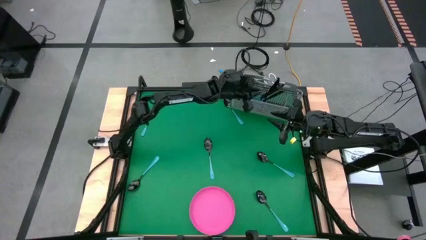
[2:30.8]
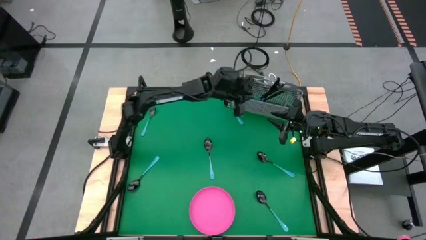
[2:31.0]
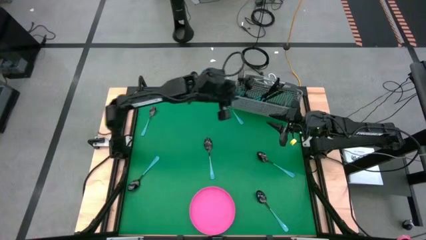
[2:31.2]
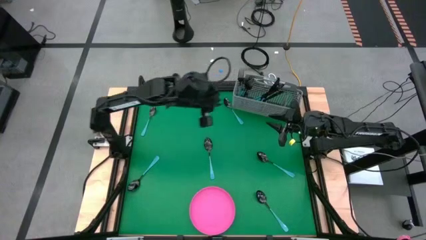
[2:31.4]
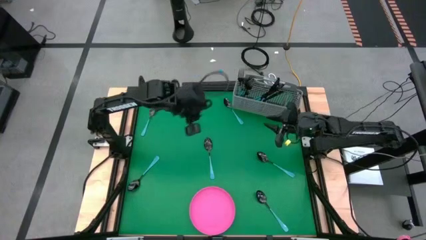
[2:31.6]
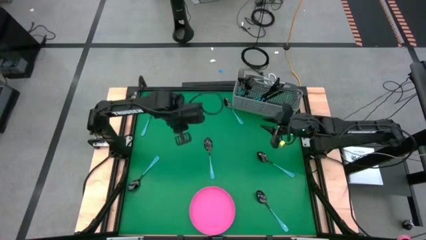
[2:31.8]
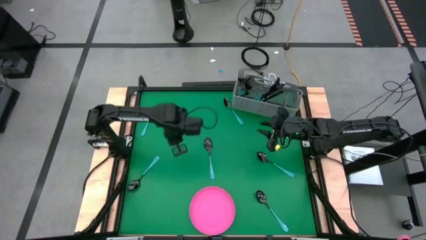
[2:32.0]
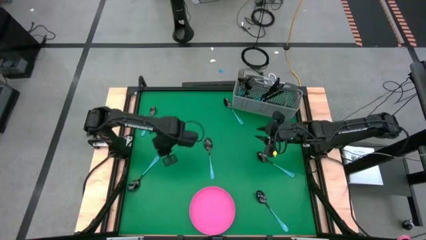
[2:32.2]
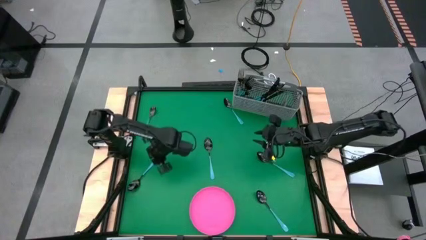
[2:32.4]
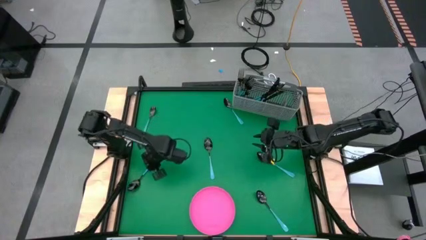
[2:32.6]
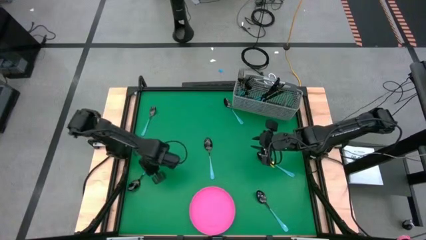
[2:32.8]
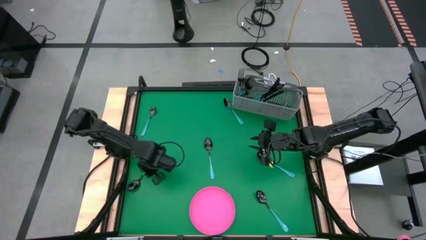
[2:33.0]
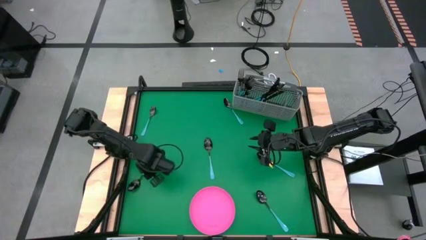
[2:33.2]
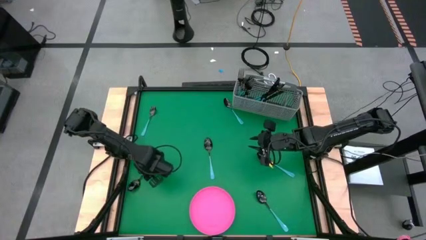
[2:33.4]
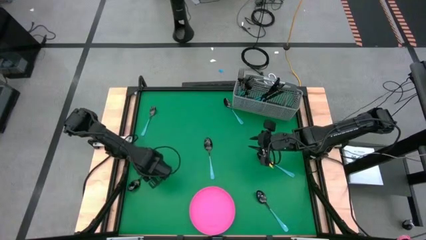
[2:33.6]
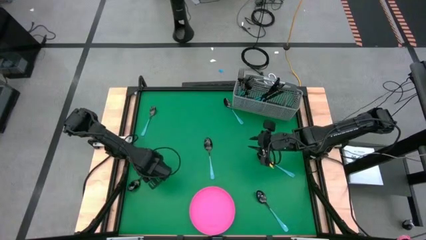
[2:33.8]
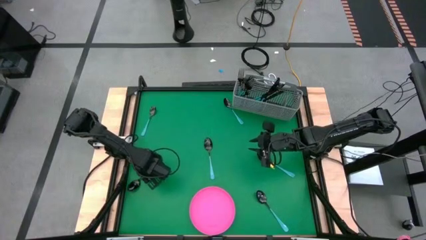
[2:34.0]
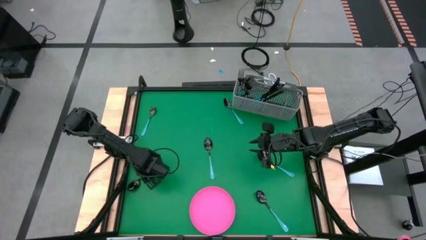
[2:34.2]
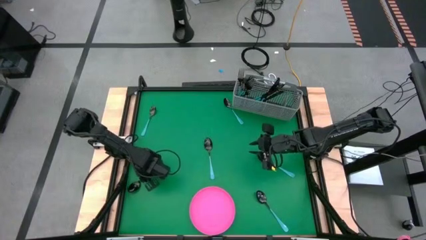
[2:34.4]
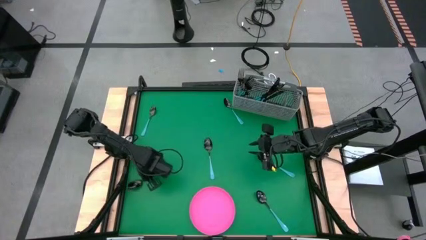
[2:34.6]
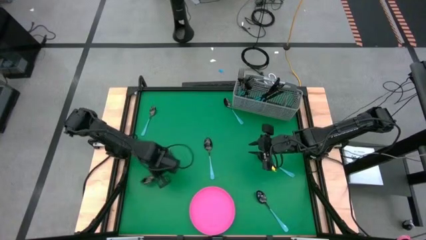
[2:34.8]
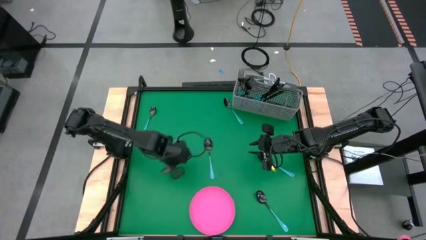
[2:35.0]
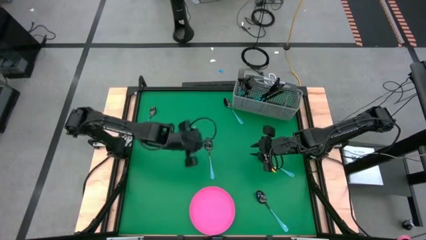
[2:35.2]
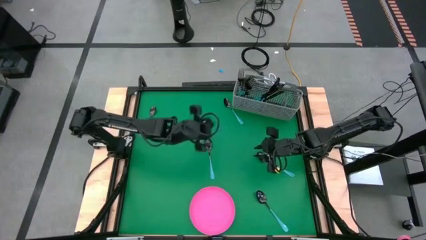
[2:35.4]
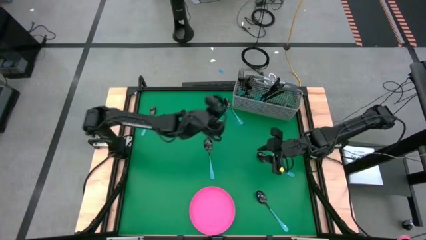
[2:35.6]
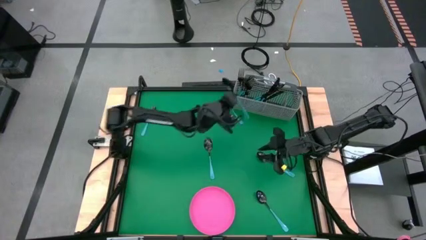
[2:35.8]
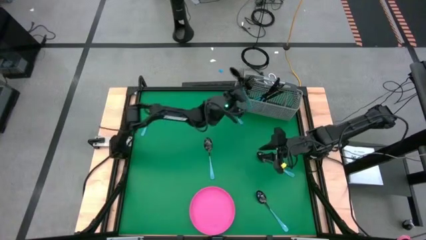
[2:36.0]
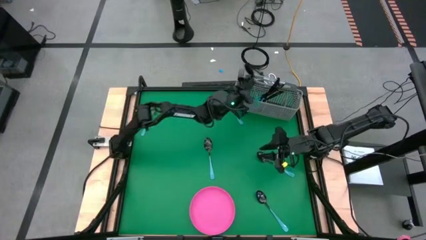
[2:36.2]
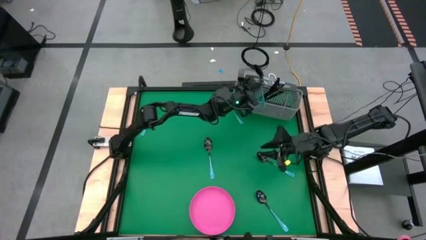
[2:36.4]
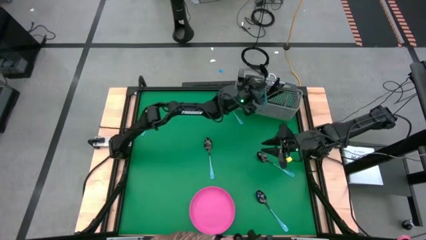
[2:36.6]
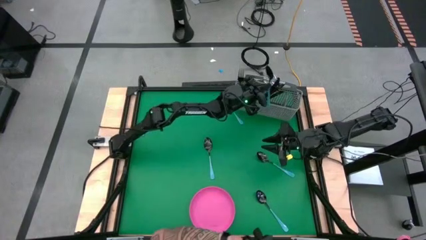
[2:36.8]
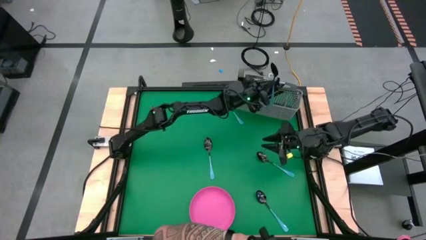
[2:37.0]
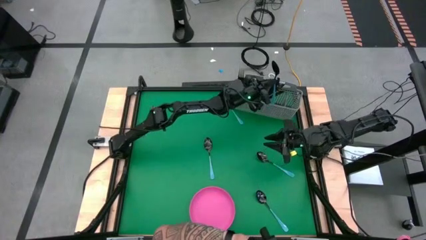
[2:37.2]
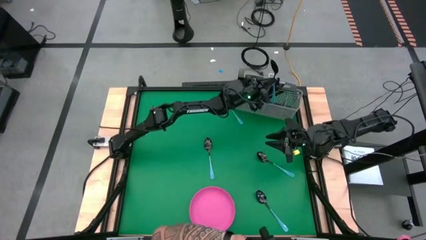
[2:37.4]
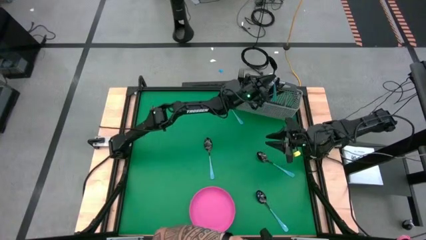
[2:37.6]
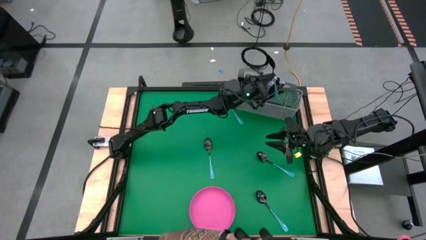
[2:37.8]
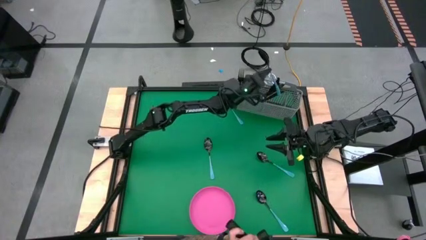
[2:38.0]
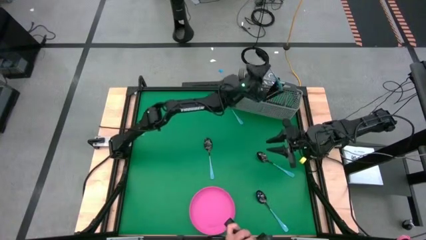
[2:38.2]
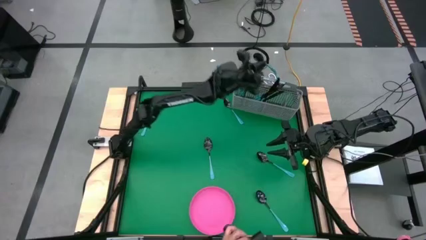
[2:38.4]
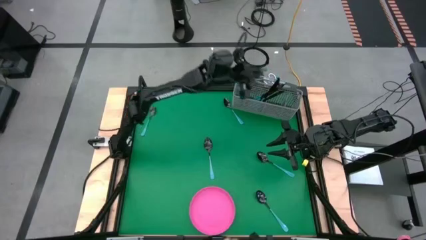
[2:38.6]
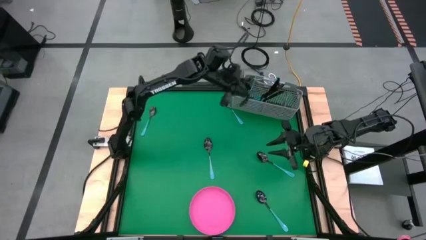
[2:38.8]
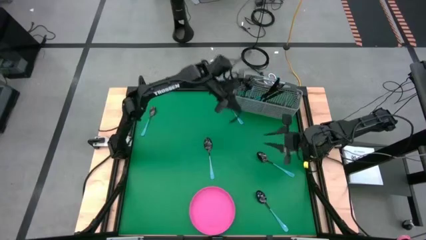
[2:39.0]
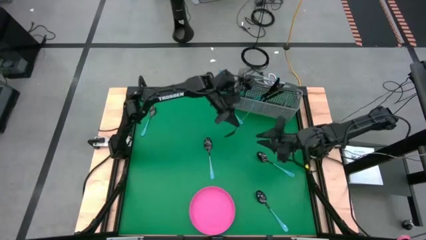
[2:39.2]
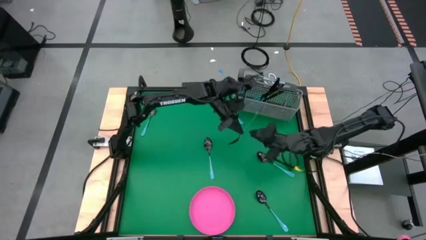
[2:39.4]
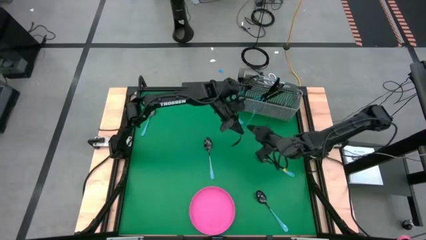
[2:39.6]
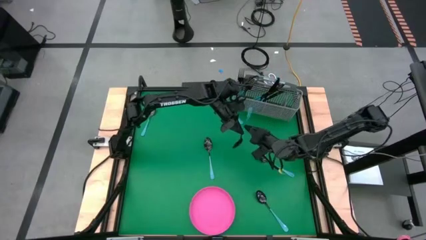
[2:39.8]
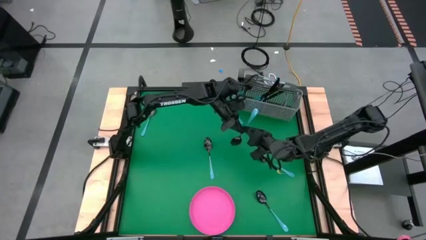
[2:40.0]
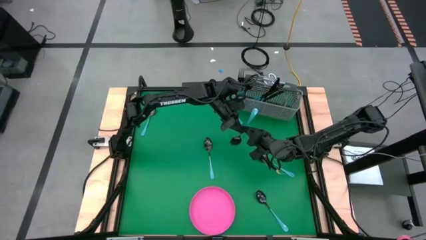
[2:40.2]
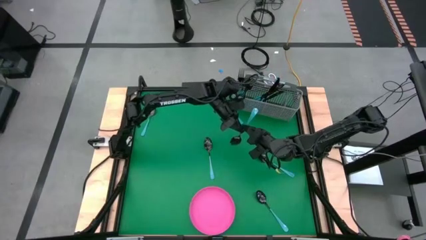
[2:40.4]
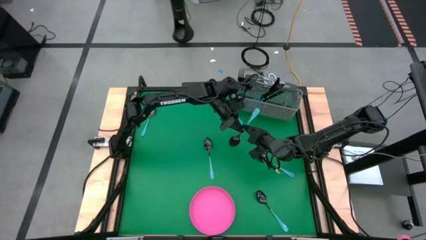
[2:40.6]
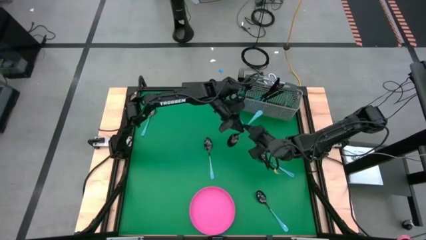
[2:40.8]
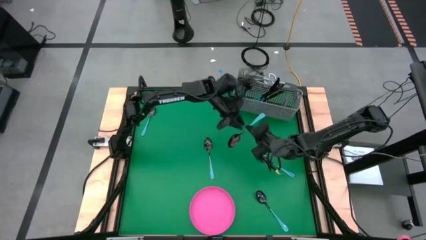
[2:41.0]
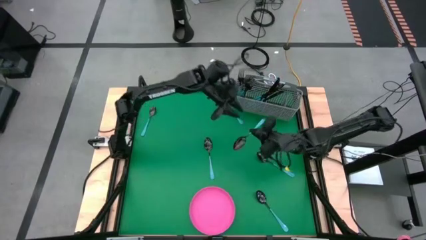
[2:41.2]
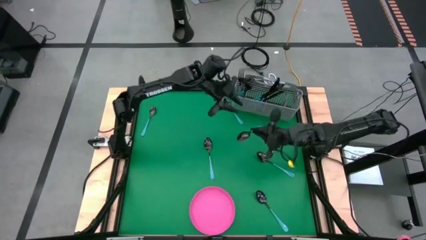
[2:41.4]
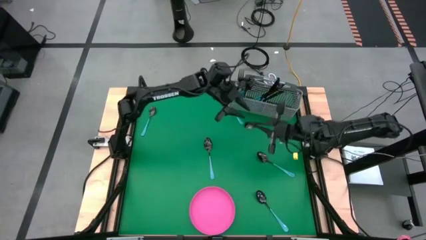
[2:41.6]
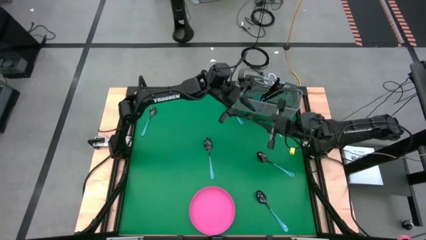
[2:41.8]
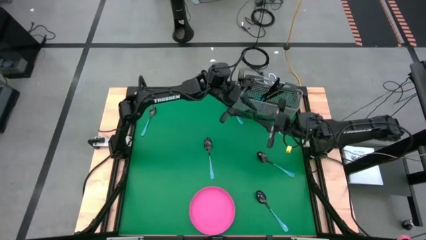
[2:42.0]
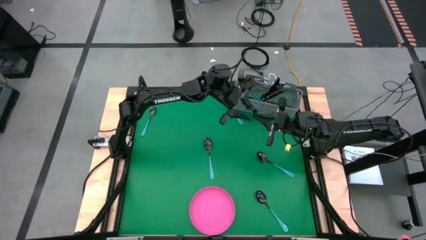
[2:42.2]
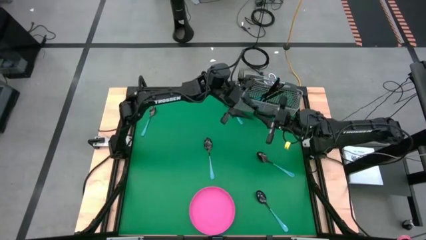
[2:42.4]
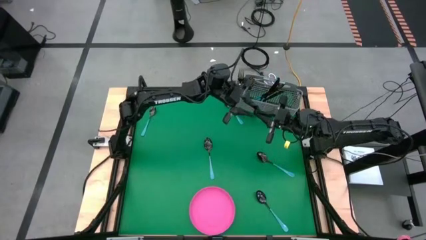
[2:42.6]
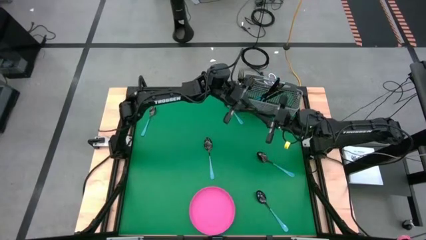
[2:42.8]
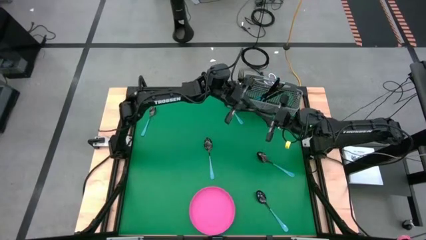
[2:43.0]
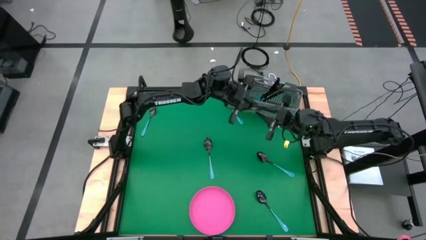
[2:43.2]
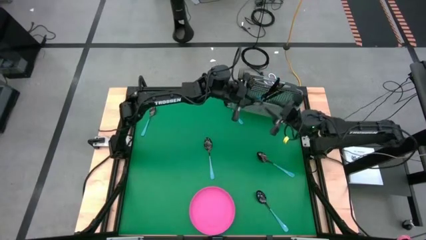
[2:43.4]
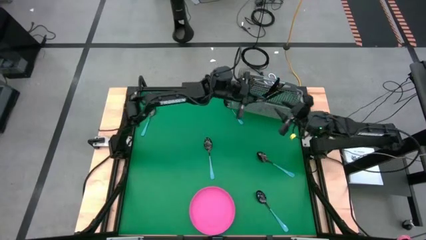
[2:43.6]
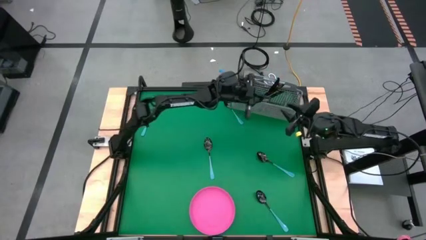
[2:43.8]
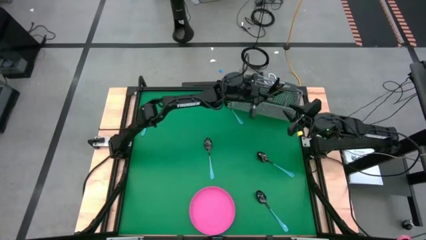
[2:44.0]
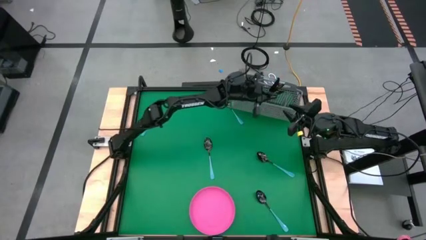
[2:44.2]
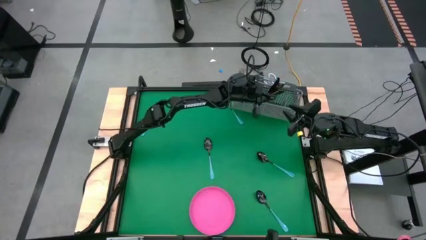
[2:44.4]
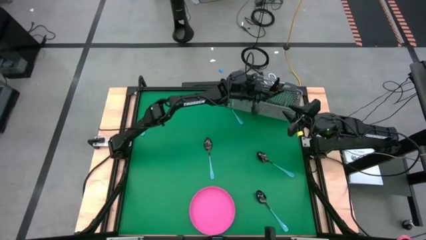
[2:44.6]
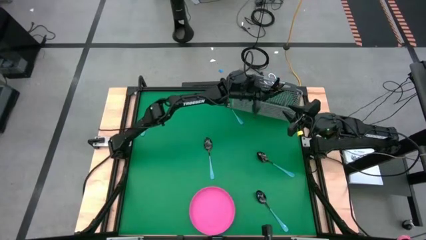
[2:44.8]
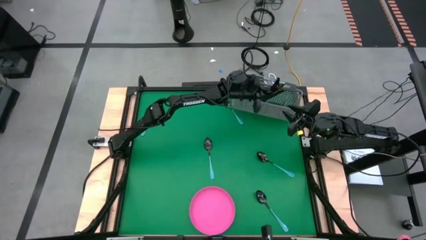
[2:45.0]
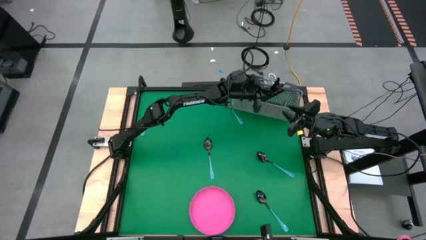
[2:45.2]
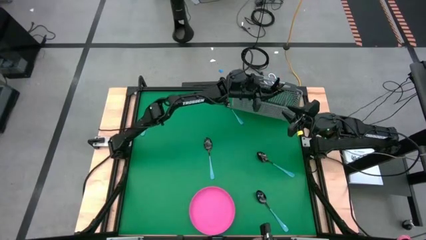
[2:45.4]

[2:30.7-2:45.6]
Task: Sort silverware
Put the blue spoon into the utensil holder

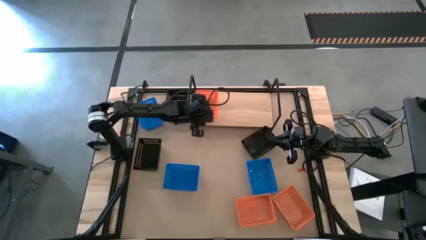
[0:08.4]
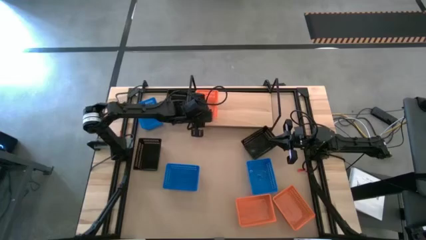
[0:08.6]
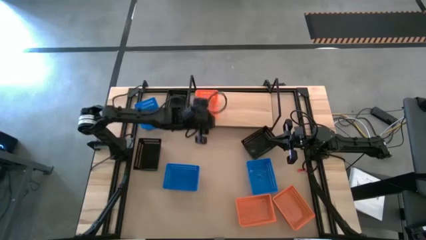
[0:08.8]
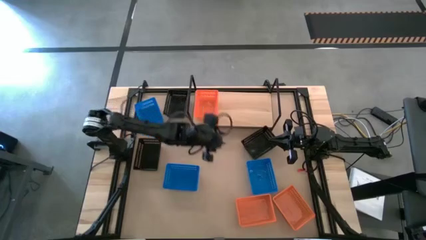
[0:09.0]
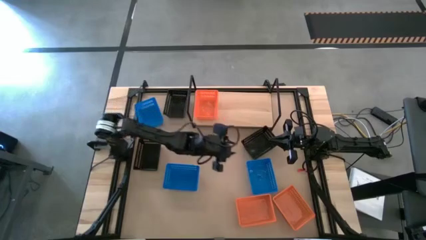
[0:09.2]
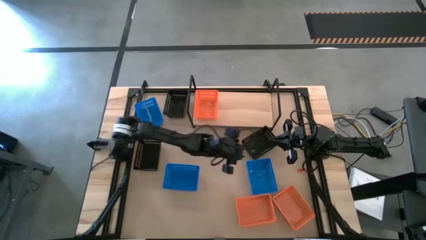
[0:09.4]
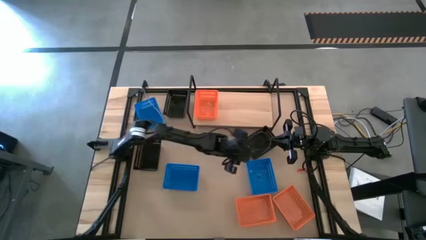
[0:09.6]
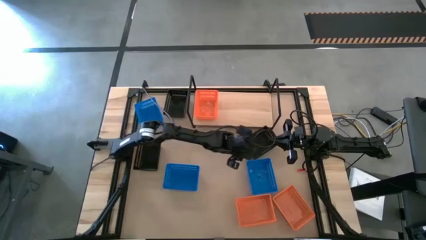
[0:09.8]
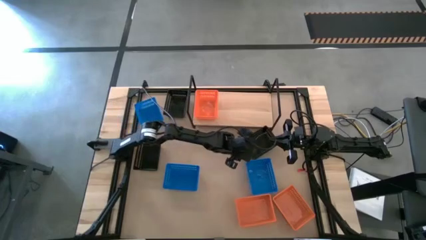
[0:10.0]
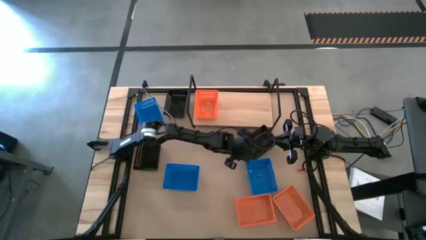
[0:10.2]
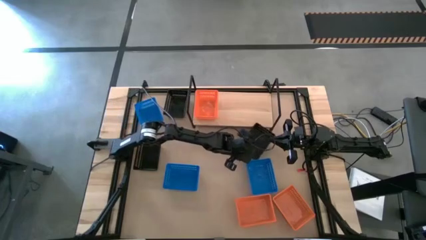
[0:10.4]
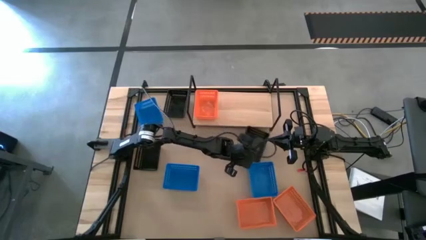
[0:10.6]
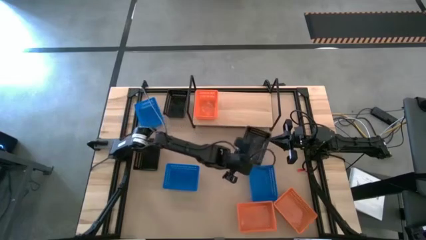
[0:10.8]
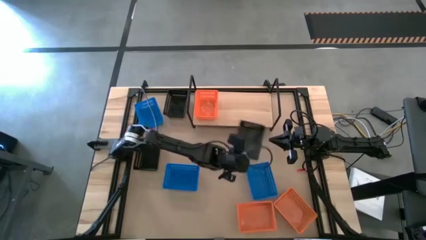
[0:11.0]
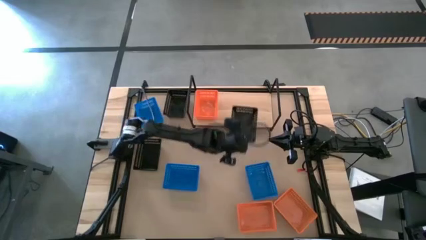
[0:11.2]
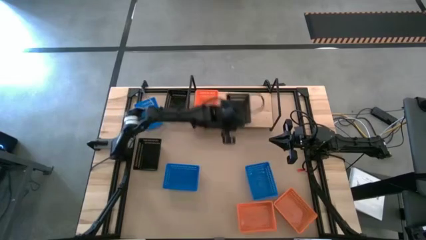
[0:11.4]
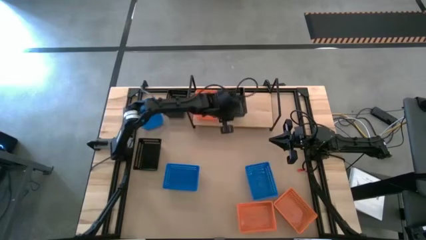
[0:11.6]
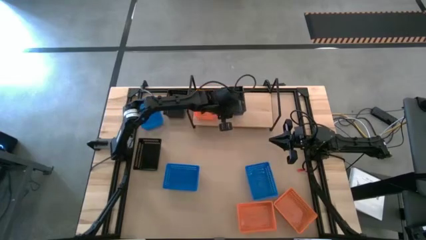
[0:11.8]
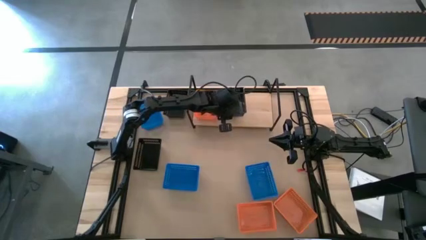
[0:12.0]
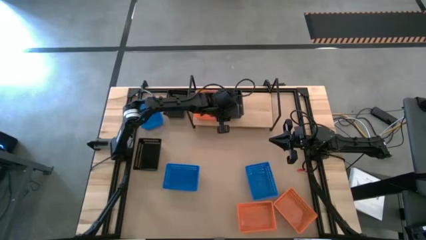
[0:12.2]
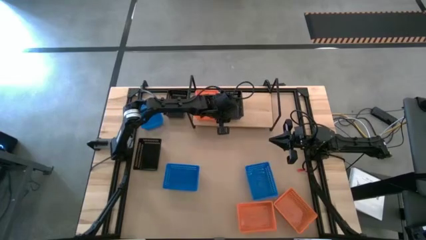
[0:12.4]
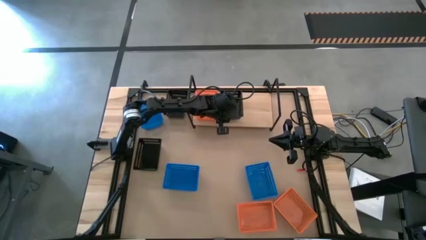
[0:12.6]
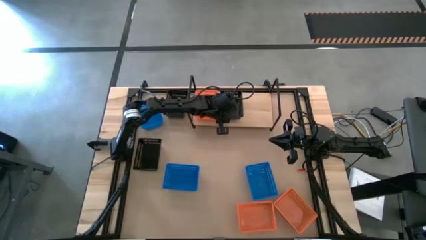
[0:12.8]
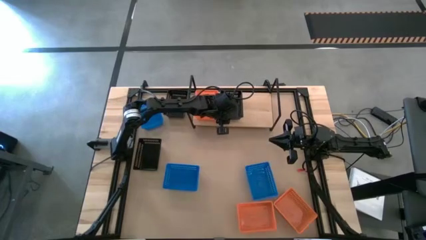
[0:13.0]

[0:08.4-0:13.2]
Task: Stack baskets on shelf by color
Put the right black bin on the shelf
